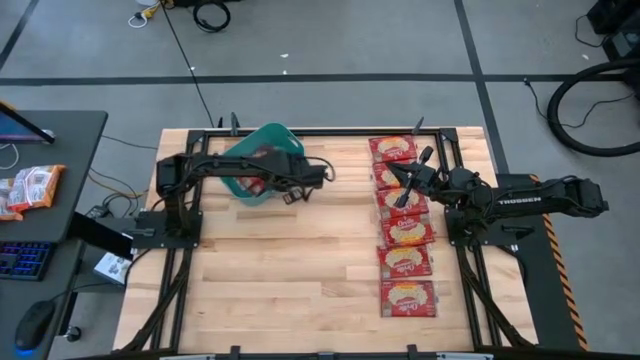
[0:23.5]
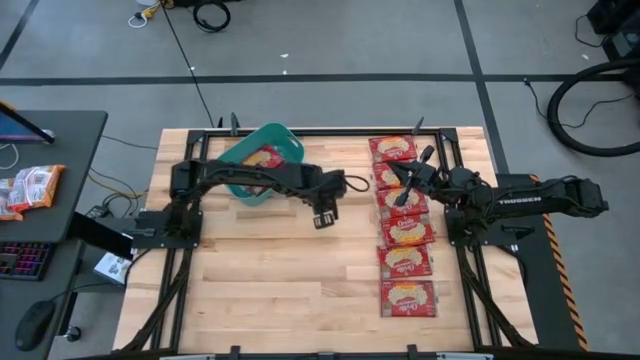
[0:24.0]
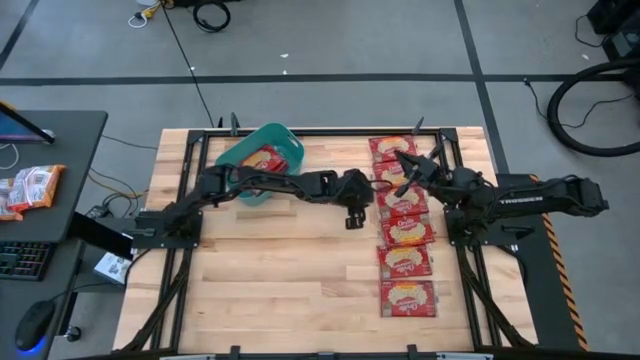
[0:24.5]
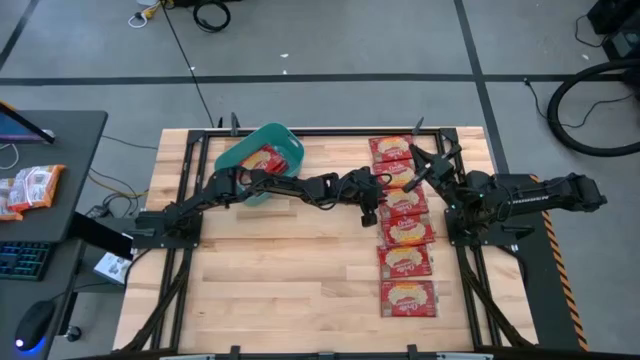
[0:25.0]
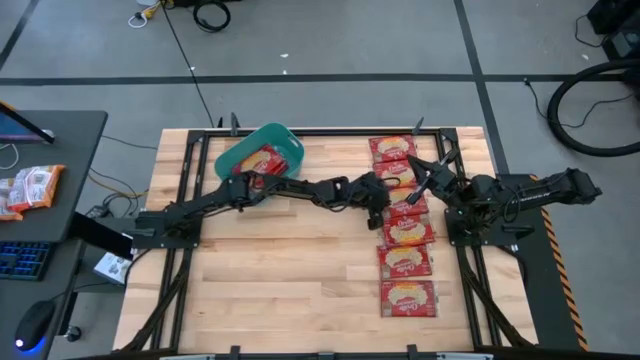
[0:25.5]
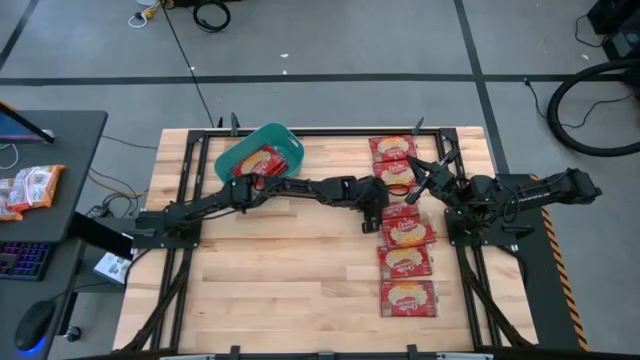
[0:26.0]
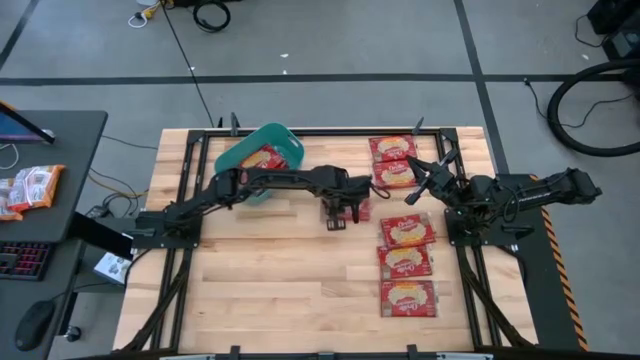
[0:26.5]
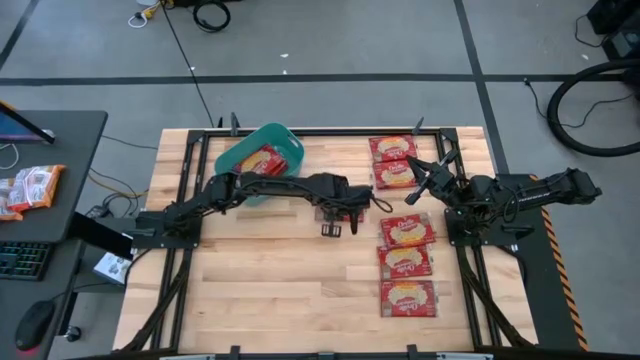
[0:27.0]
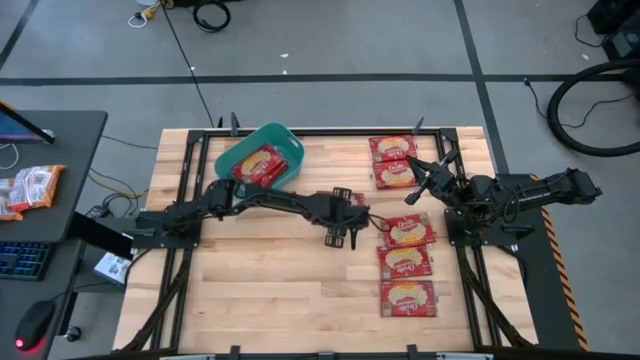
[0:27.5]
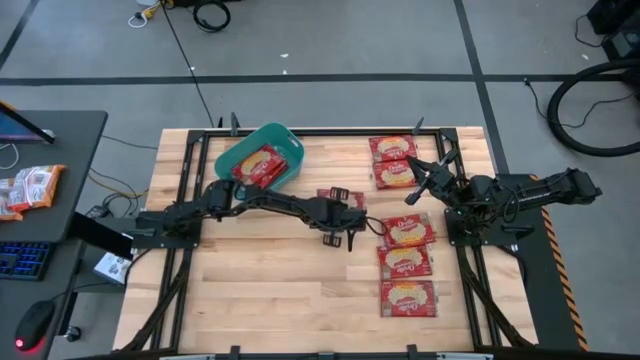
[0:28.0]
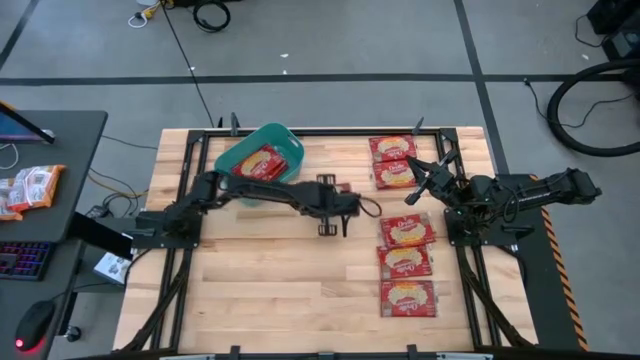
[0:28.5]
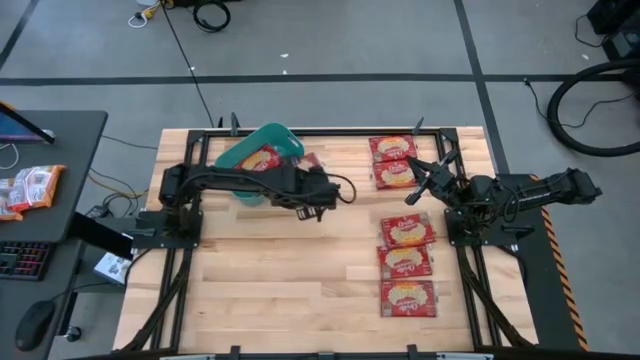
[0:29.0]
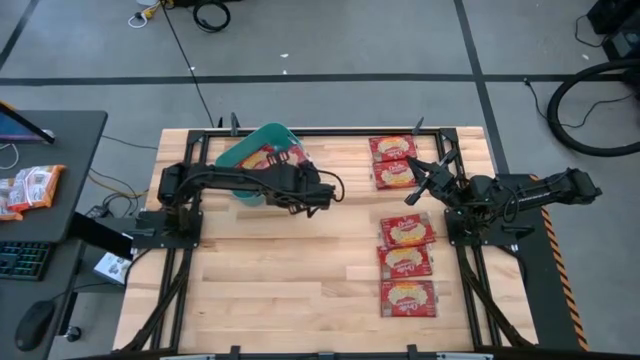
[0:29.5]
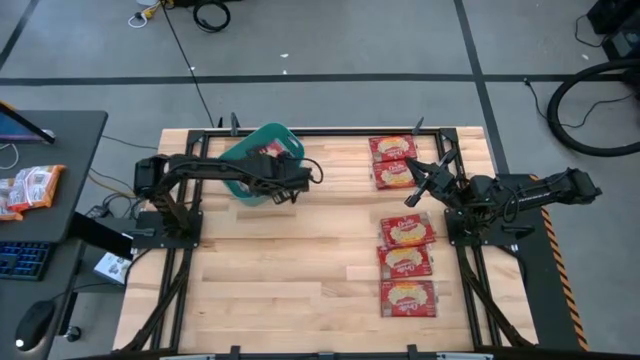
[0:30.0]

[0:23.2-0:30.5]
Task: Sort popcorn bags into baskets
Put the popcorn bag into the bin

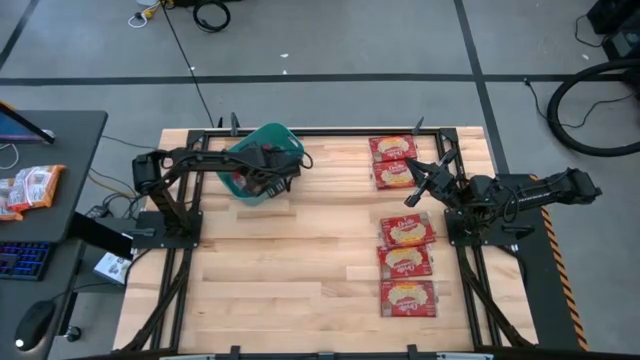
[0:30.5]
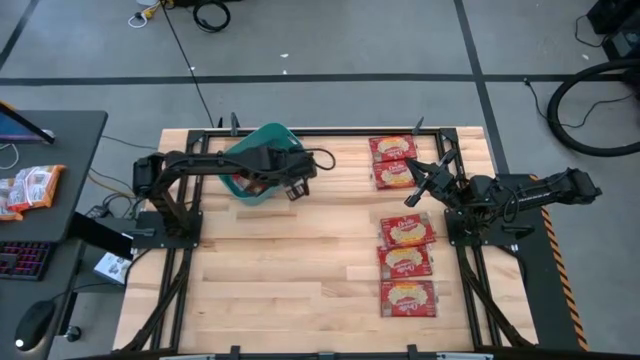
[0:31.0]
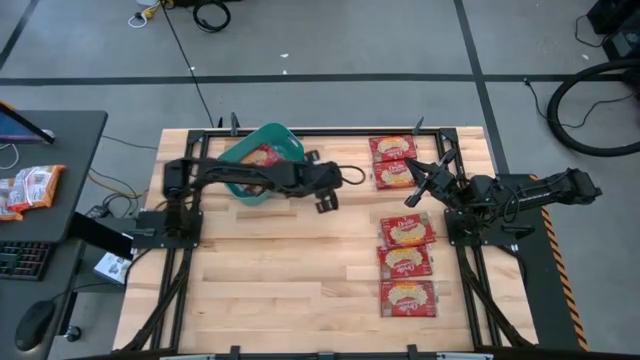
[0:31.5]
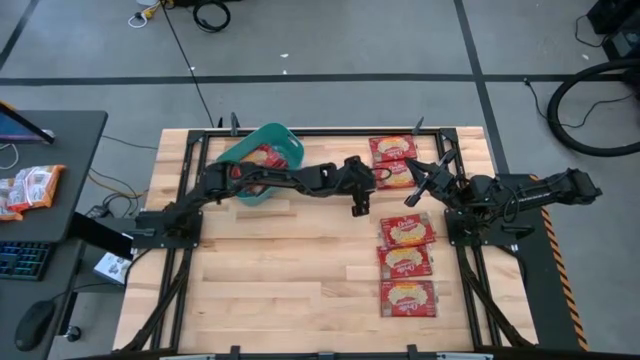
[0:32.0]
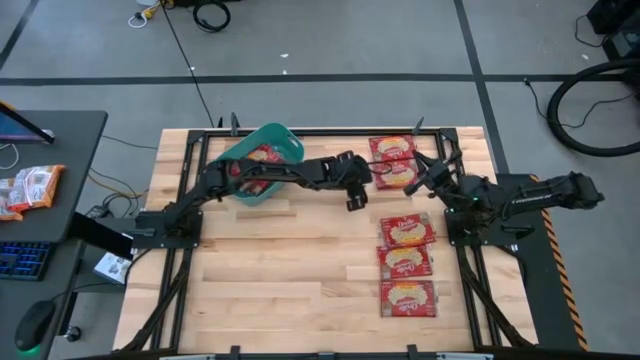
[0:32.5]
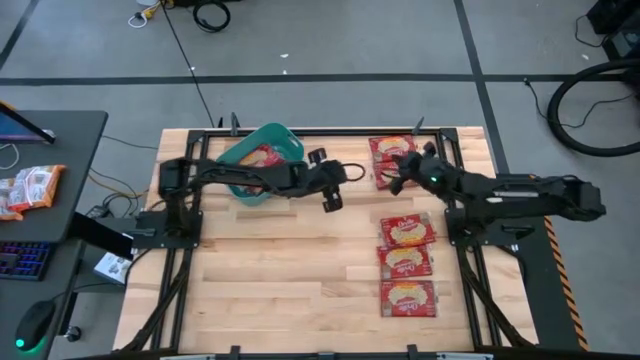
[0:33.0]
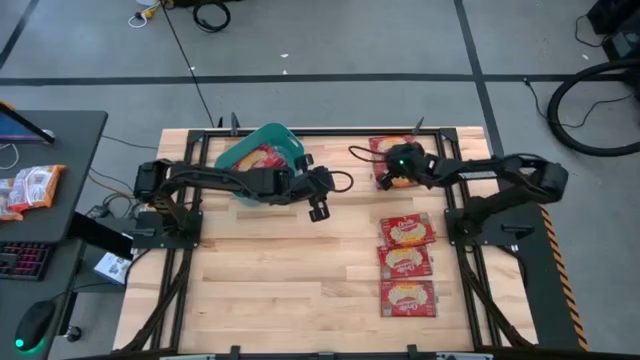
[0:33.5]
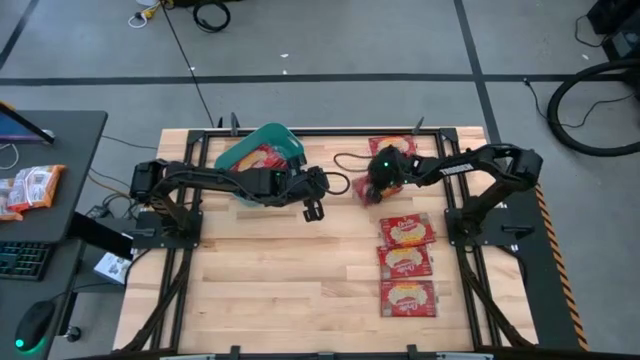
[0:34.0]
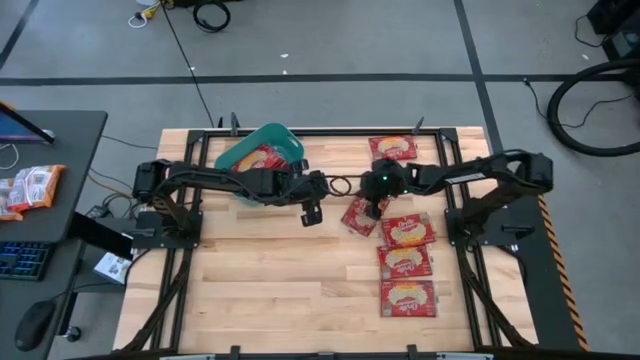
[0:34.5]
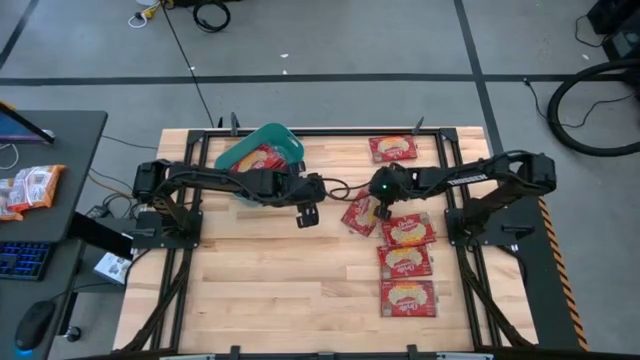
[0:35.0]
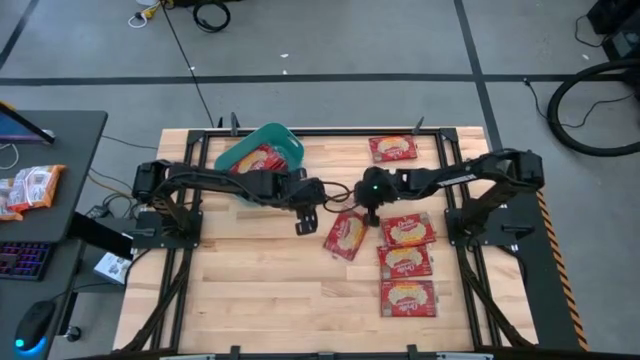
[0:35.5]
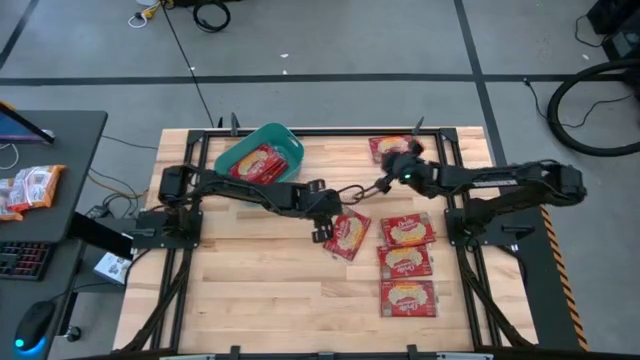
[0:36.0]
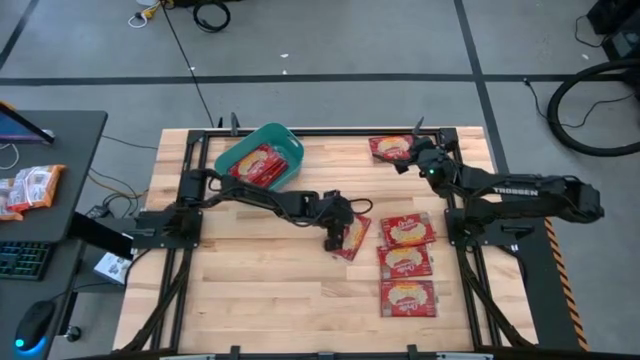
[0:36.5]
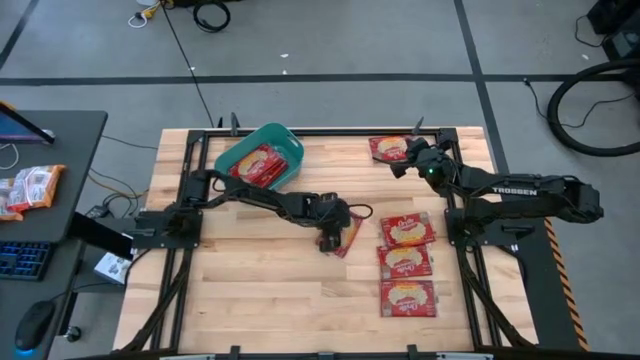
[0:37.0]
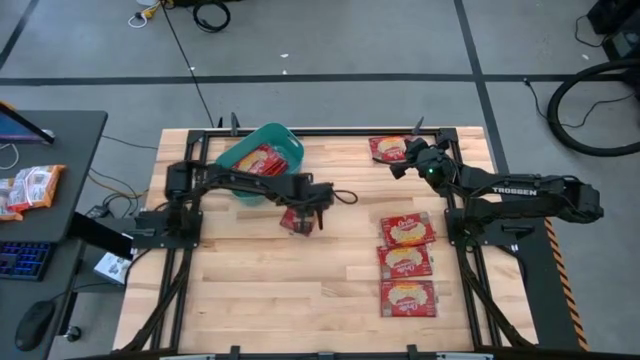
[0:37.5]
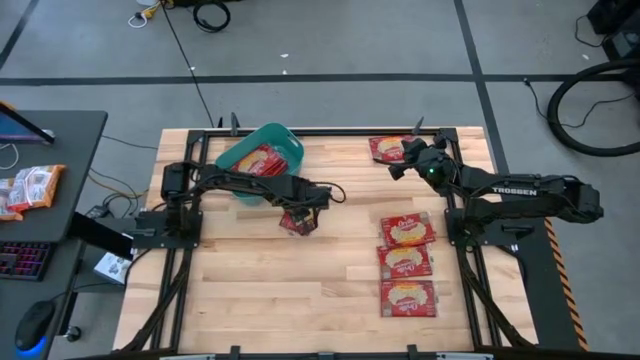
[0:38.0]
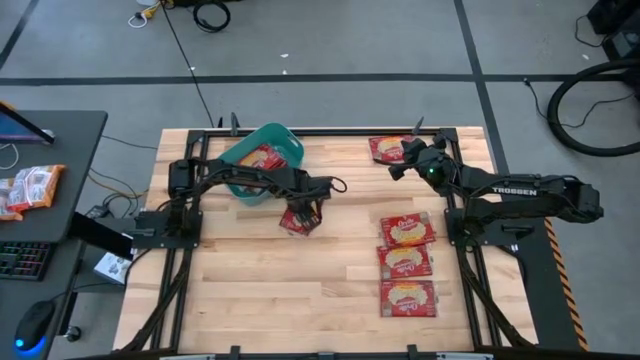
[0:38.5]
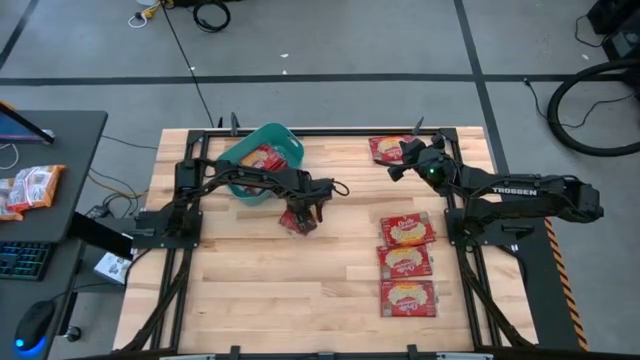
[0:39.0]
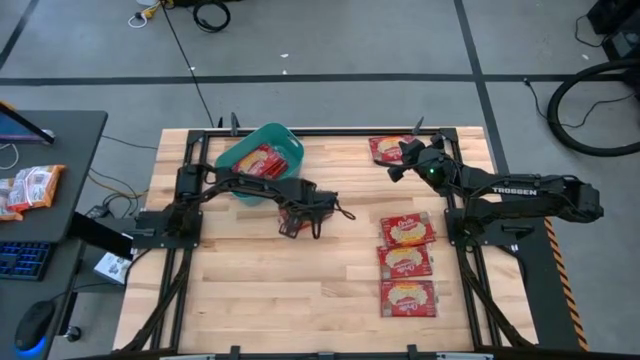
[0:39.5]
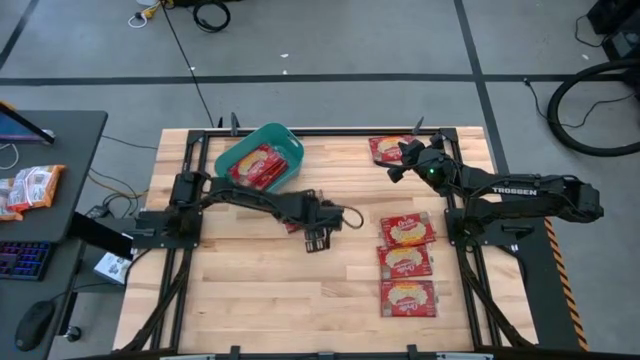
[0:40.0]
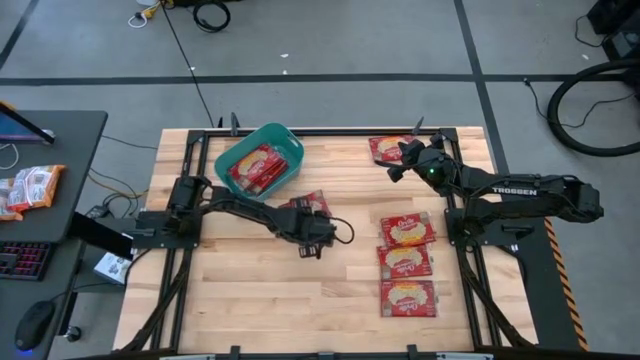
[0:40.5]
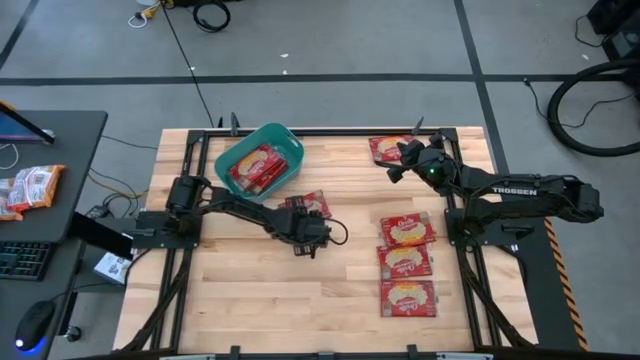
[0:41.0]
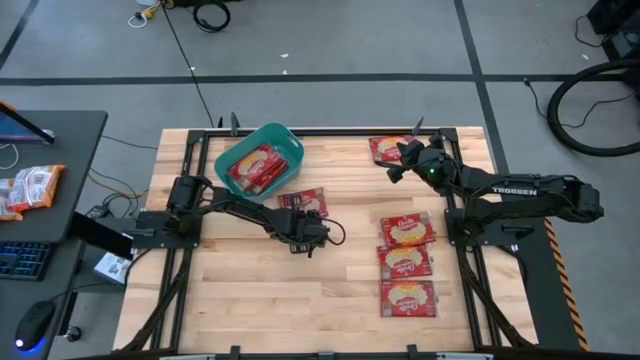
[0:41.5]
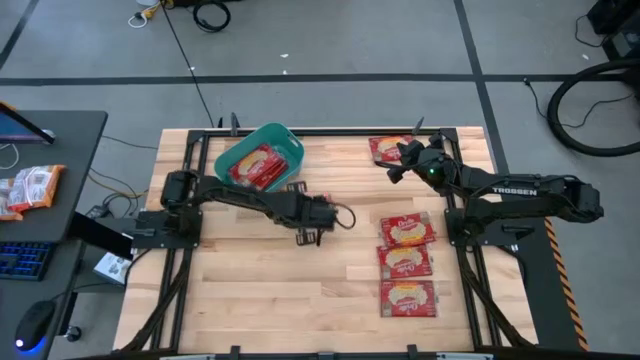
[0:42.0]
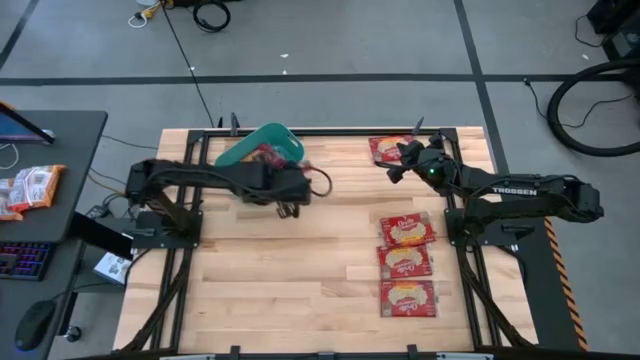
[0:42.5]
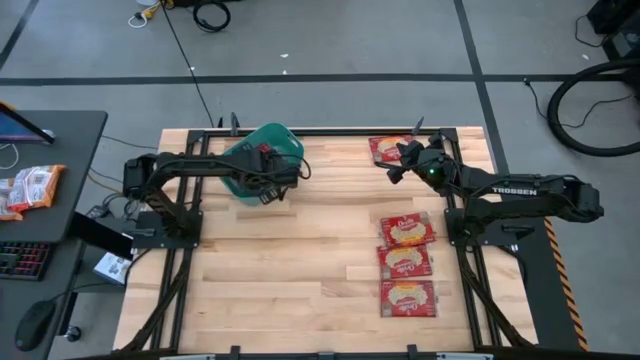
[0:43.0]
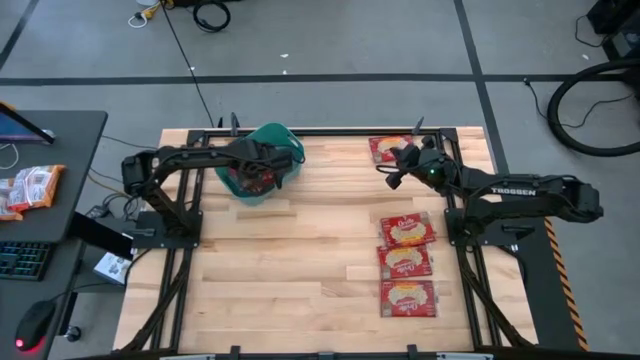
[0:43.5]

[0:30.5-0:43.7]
Put the popcorn bag into the bin
